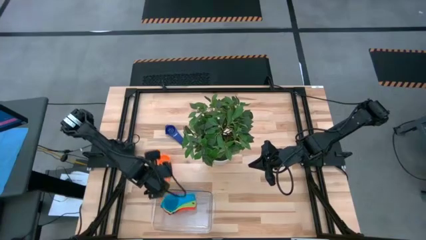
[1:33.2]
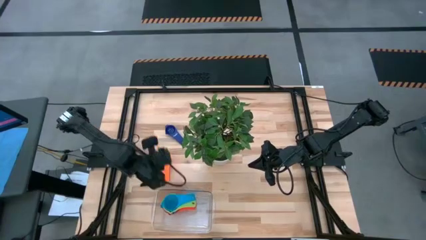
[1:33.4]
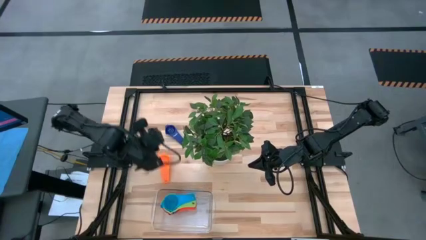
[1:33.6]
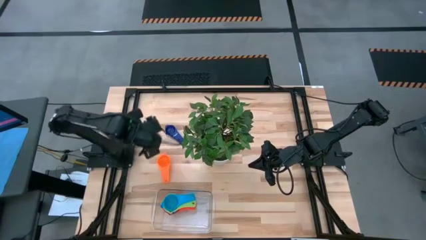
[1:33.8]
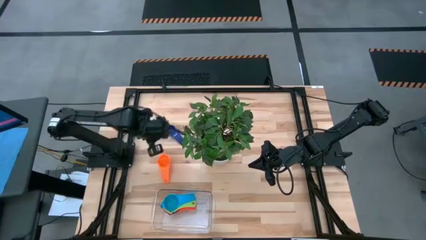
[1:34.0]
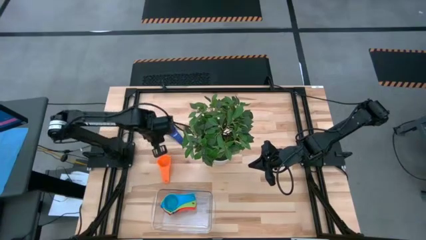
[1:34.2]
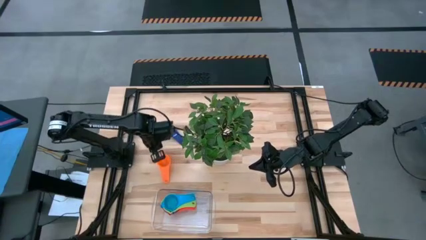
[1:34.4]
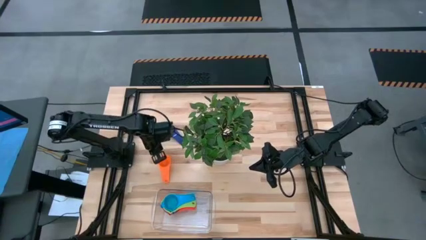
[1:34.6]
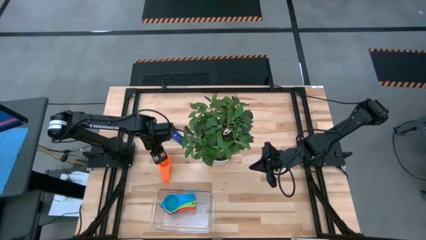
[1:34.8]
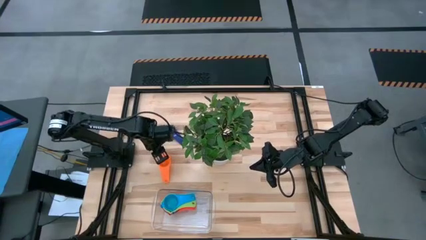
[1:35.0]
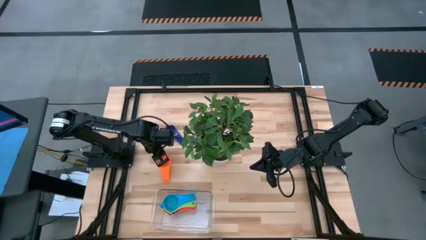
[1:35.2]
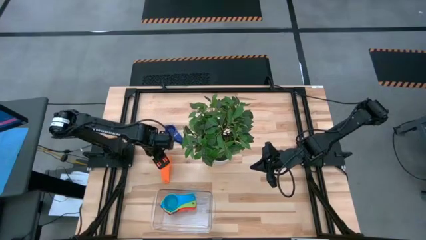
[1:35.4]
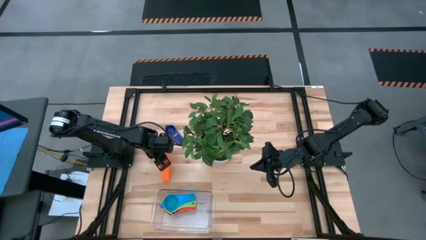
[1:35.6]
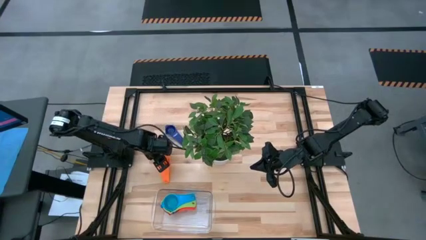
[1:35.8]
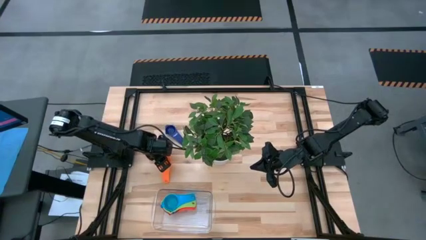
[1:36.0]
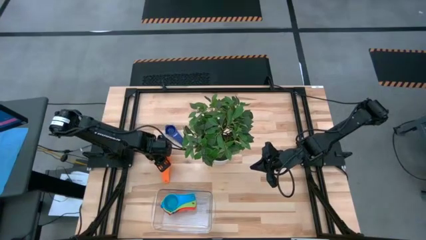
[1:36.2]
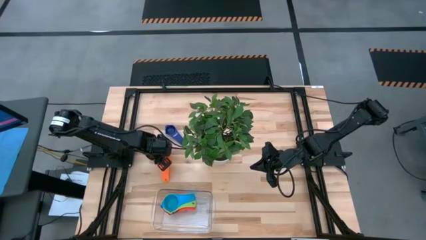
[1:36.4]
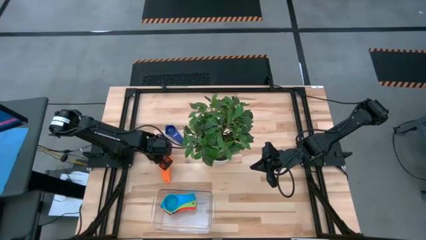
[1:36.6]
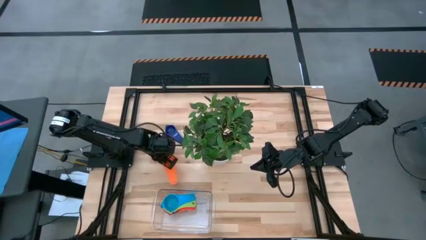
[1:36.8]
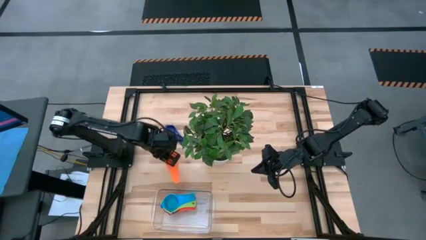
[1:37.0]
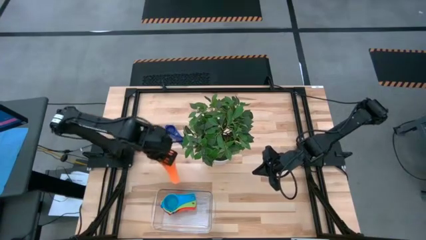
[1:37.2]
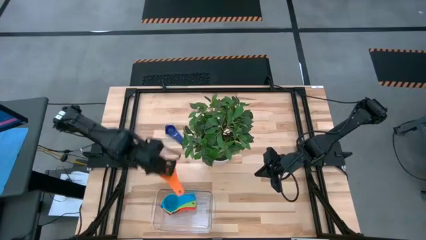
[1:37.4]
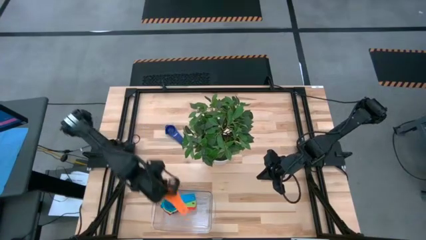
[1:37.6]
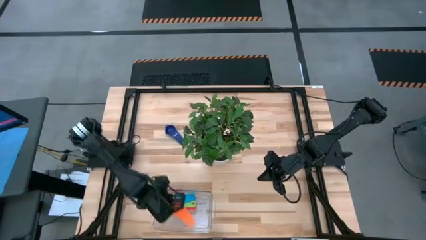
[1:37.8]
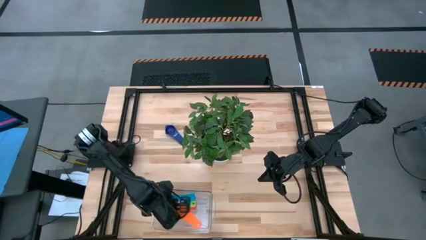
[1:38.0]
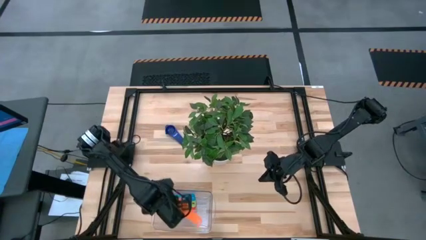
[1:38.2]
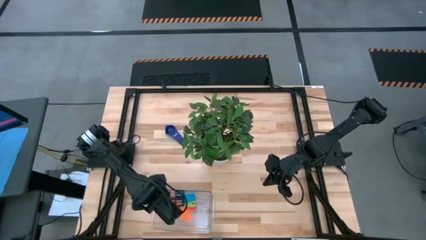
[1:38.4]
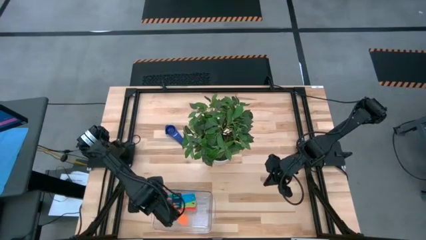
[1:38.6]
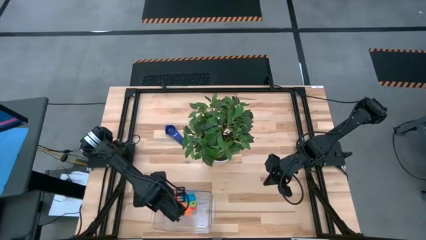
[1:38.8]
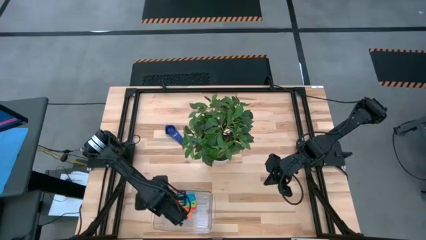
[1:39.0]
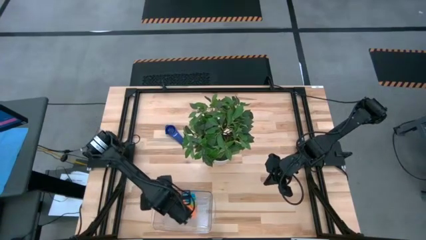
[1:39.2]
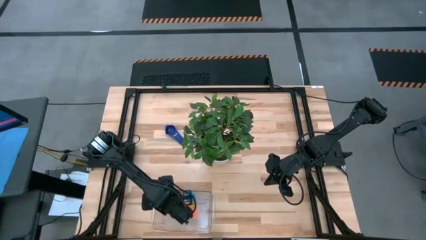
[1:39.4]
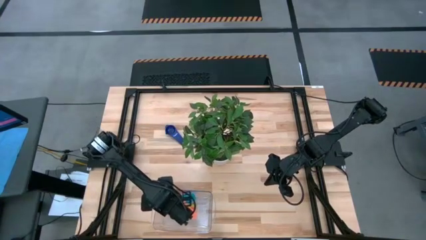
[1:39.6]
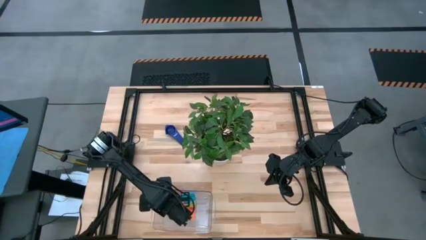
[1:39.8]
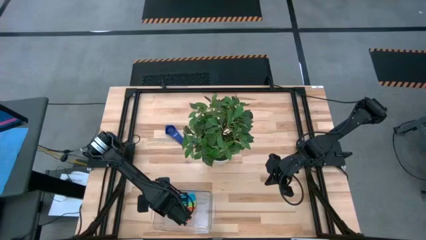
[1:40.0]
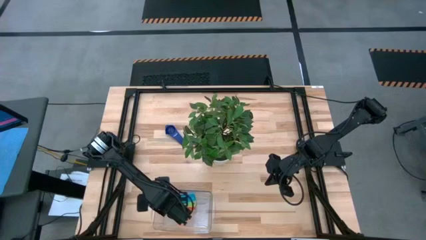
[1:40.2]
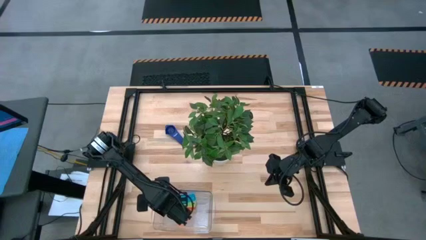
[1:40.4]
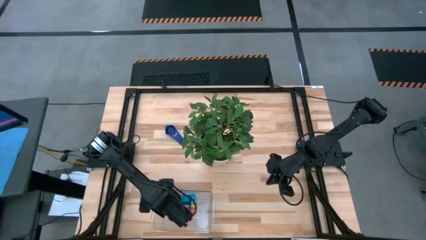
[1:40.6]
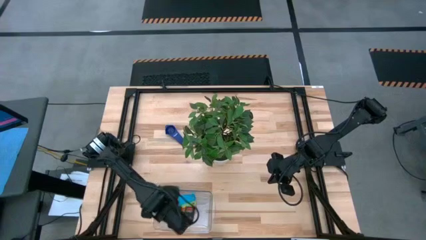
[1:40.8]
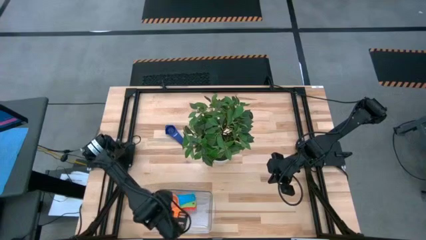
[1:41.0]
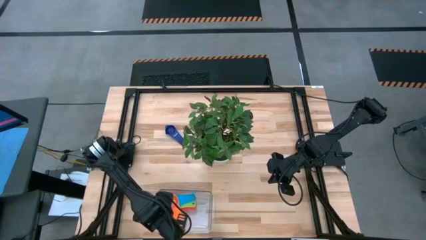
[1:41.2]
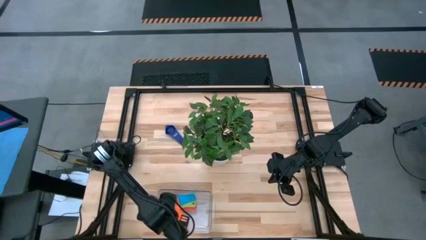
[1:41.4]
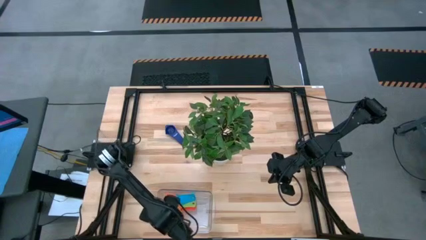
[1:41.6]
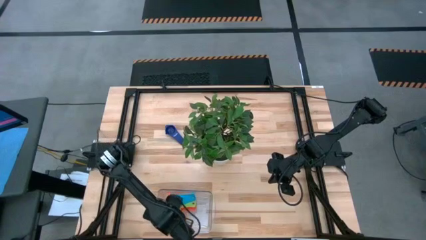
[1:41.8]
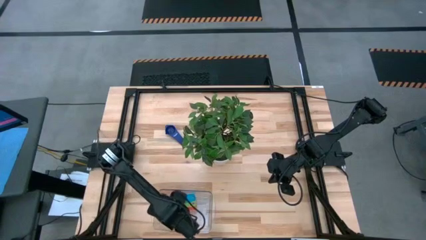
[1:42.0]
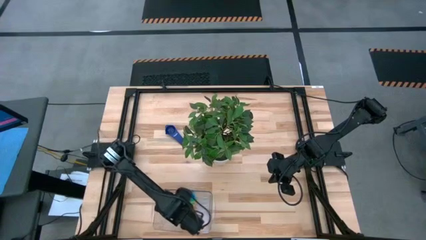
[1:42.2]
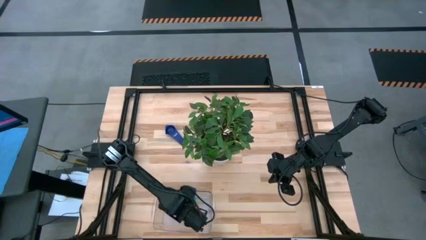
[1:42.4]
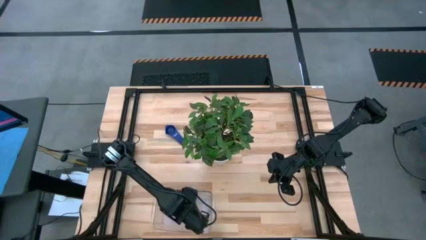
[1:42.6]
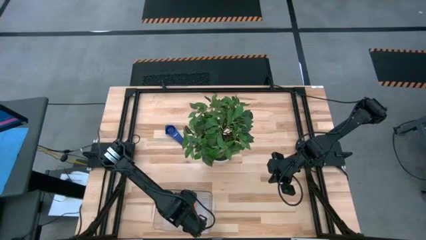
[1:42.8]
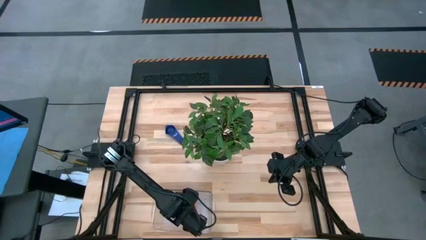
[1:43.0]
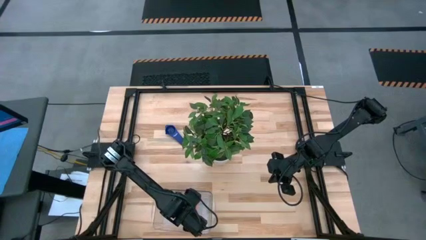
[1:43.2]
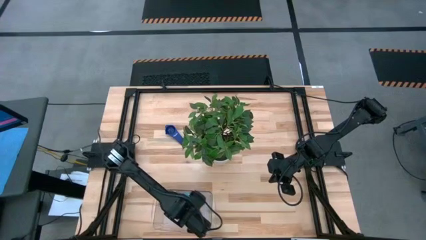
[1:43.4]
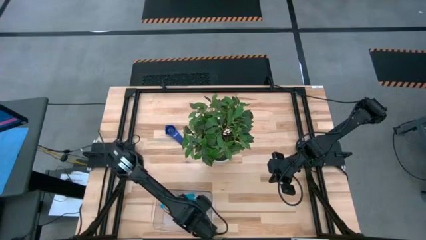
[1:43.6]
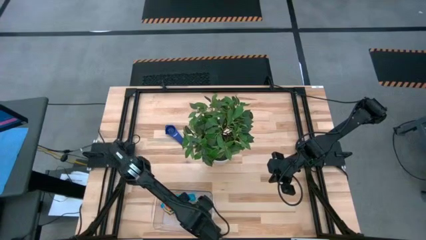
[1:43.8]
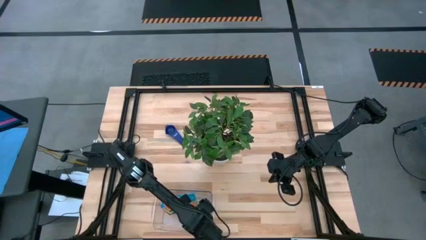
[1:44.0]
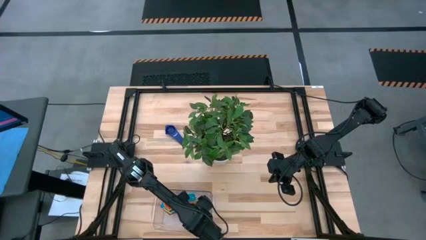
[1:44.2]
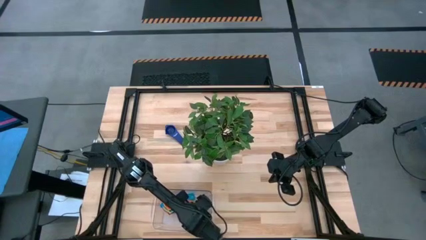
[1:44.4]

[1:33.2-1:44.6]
Task: Nest measuring cups in basket
Stack the orange measuring cup on the light blue measuring cup

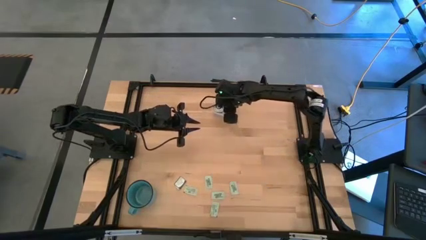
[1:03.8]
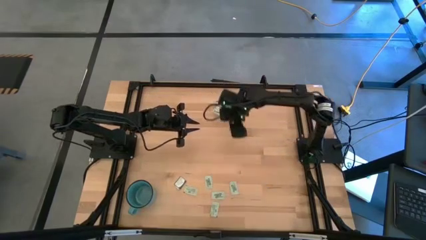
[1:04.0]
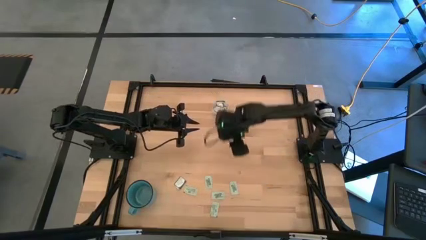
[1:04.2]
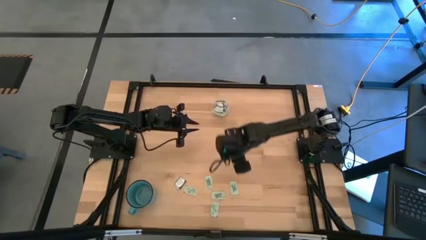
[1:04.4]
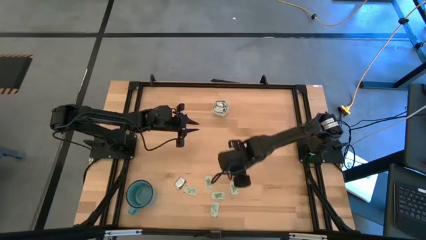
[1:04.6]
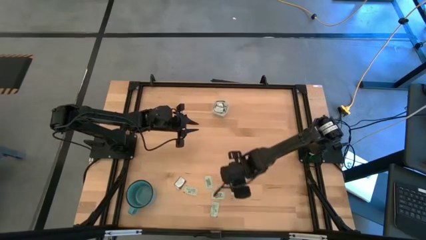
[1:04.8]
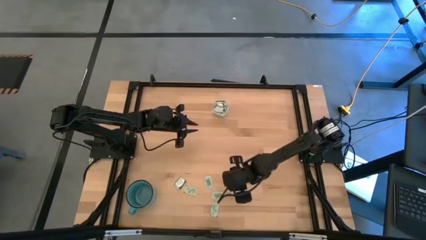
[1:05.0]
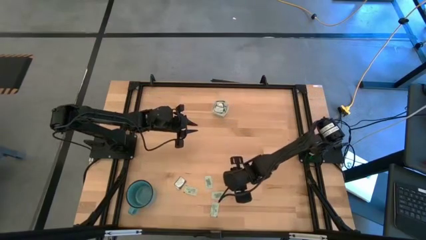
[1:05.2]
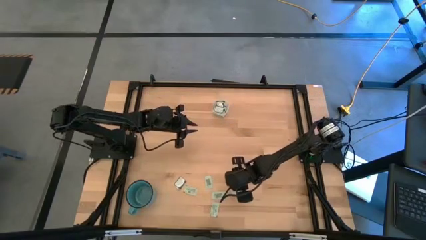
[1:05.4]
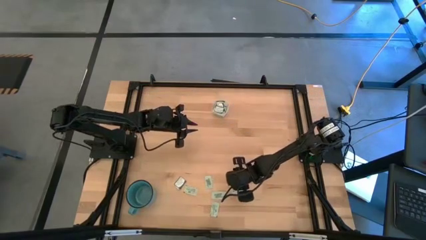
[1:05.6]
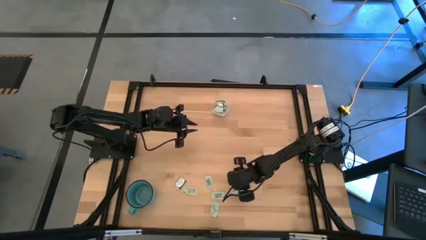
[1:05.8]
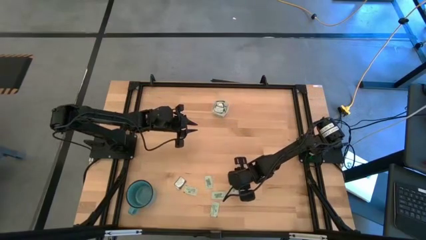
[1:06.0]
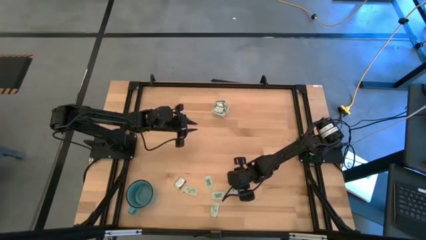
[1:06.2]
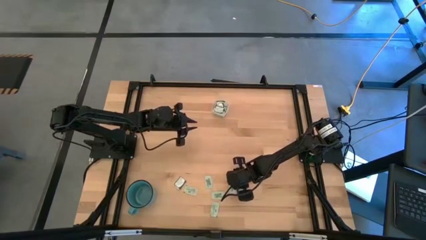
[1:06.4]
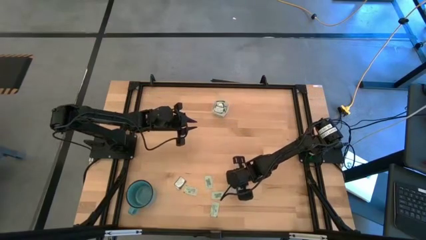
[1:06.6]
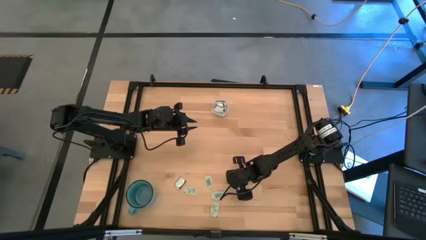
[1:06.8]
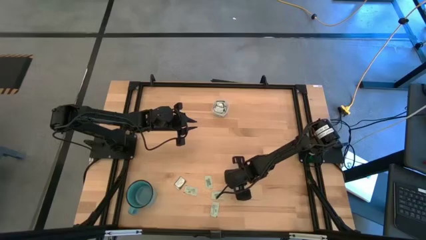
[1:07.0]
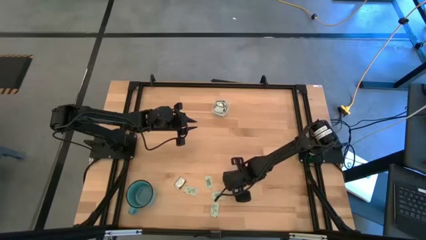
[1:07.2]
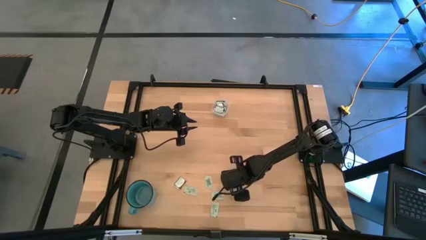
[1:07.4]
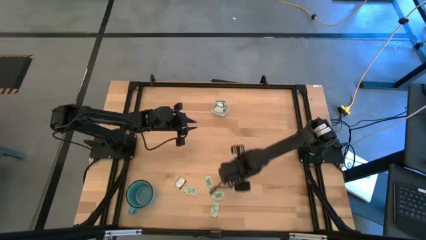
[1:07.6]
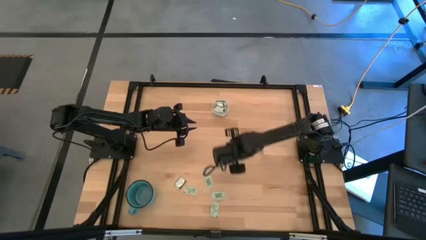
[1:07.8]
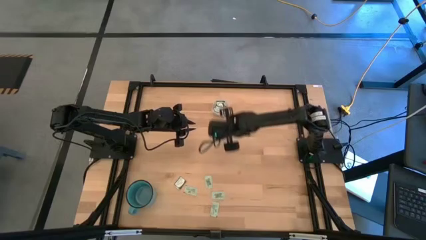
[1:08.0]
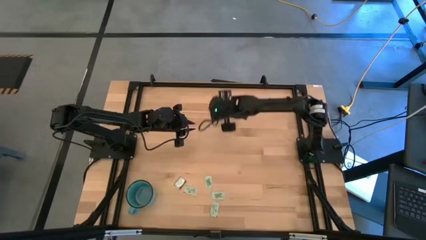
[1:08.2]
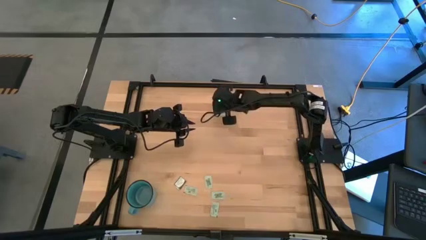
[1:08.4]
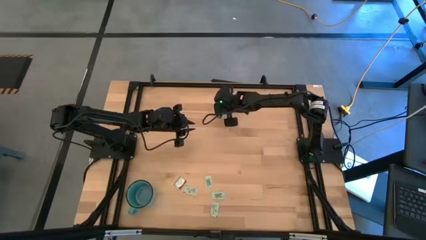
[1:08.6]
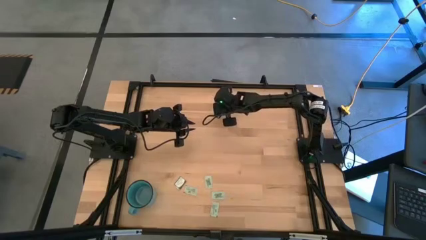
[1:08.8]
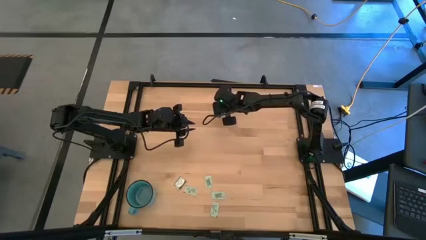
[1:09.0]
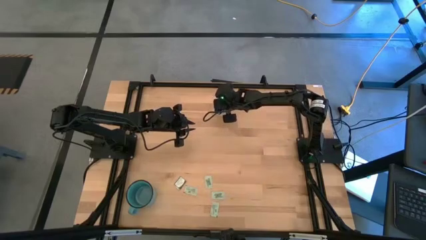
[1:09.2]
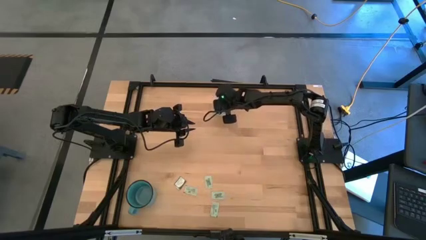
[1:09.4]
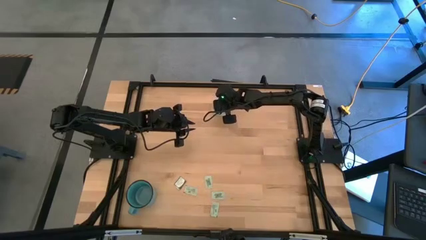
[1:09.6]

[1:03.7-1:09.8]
Task: Pick and place items into bin
Put the light green stevia packet into the transparent bin
